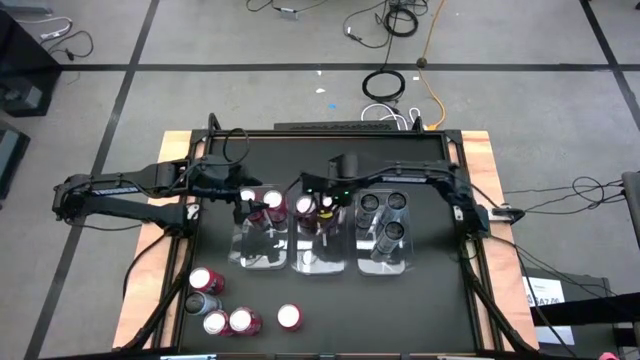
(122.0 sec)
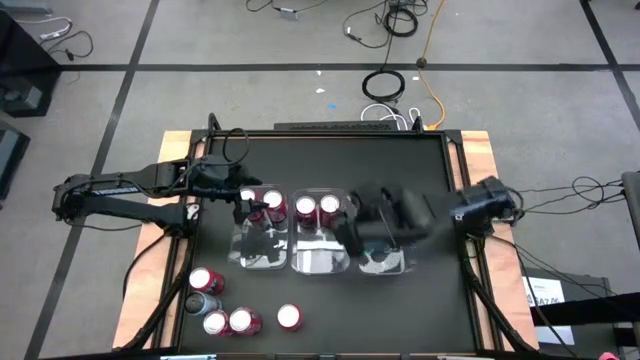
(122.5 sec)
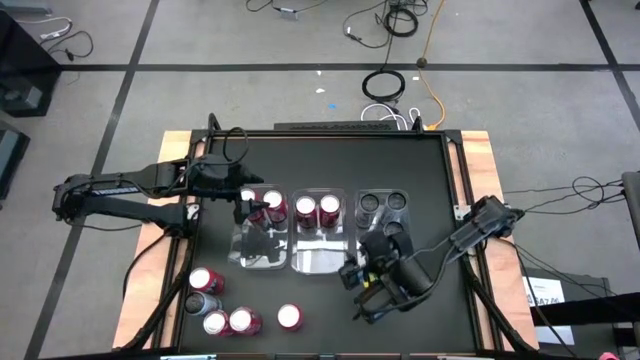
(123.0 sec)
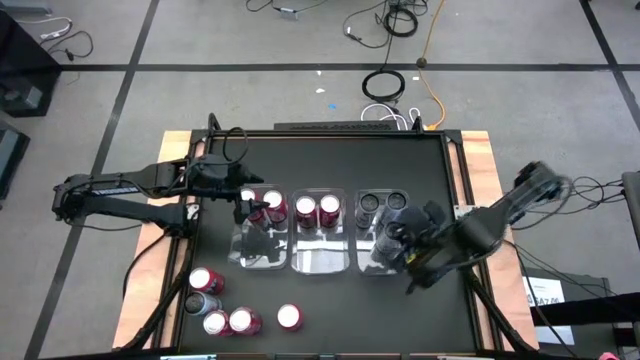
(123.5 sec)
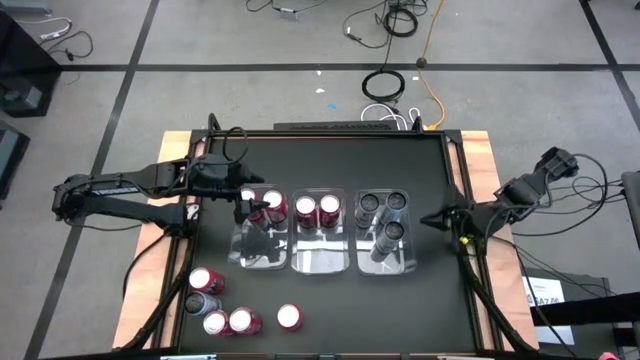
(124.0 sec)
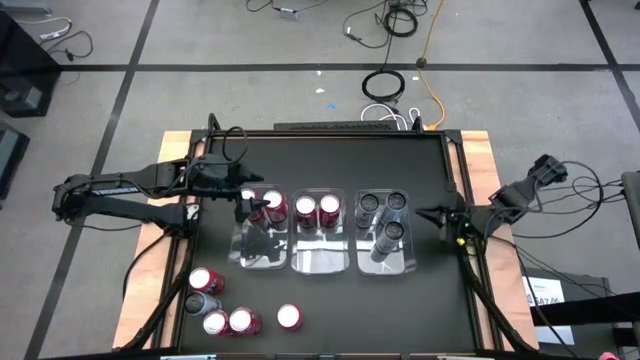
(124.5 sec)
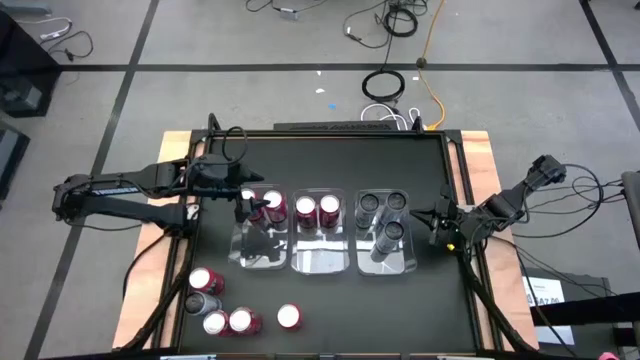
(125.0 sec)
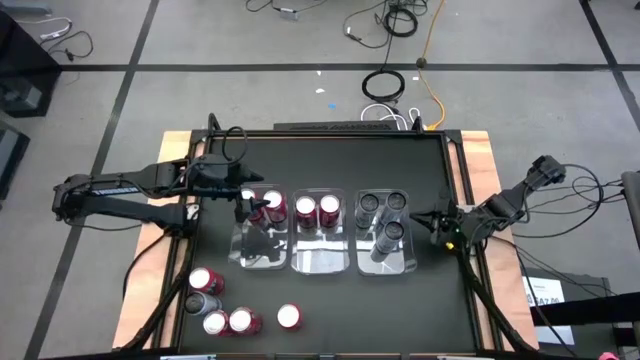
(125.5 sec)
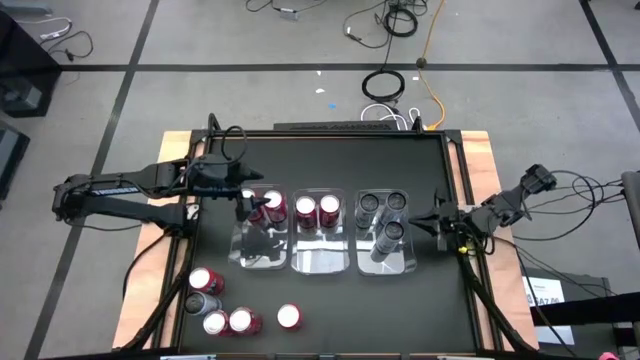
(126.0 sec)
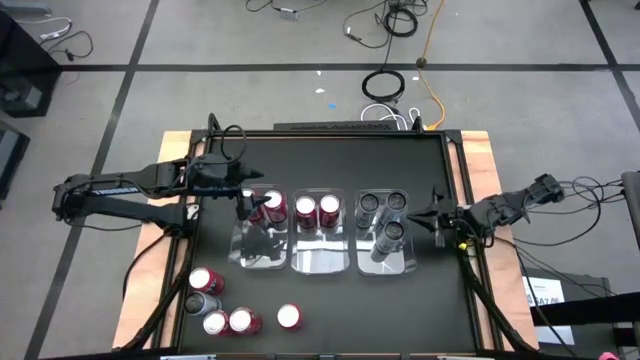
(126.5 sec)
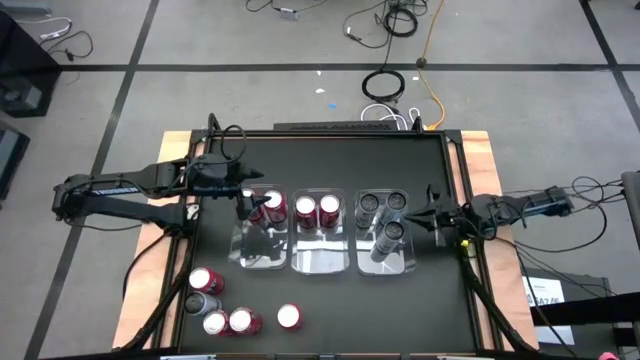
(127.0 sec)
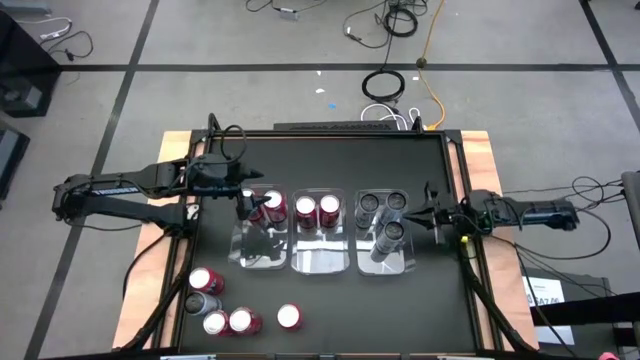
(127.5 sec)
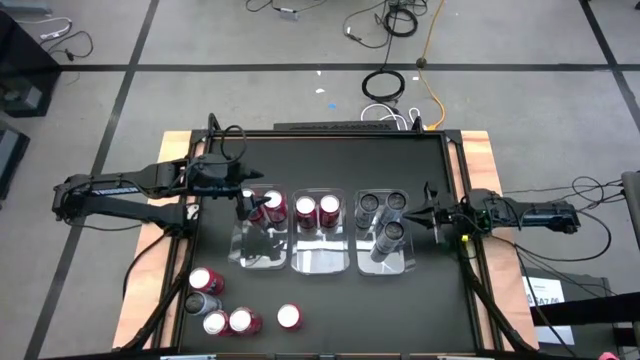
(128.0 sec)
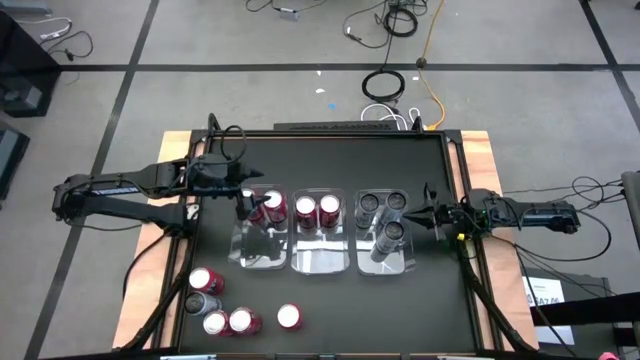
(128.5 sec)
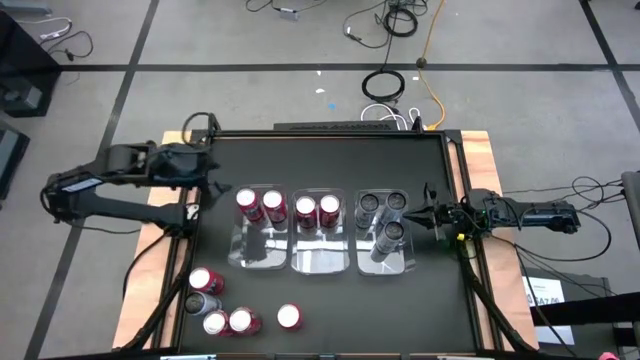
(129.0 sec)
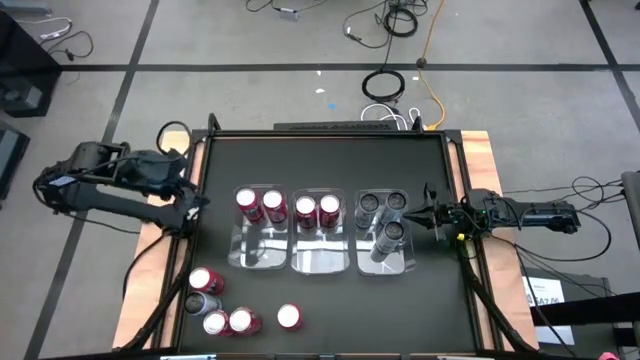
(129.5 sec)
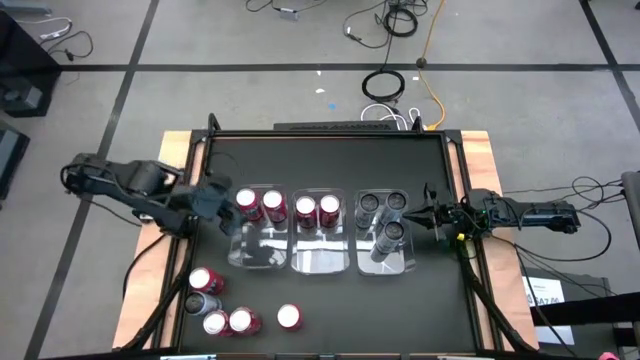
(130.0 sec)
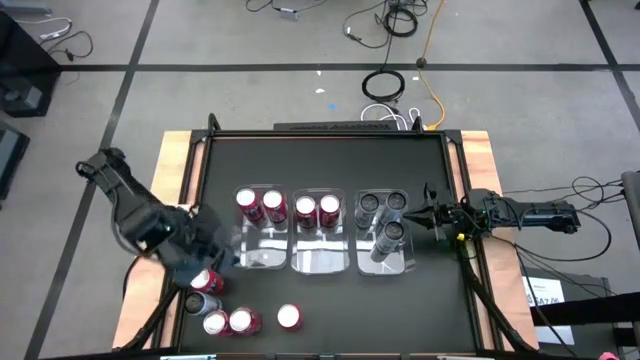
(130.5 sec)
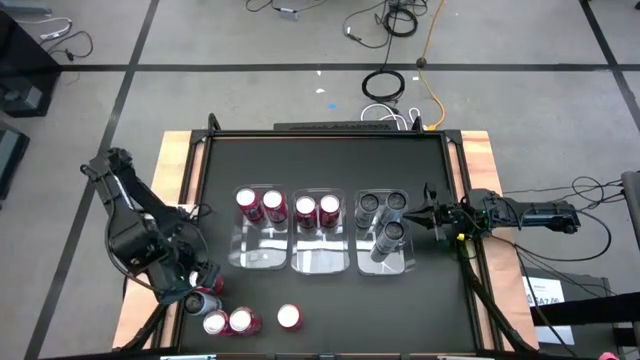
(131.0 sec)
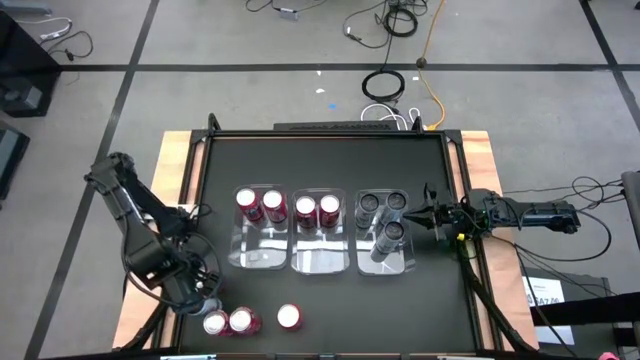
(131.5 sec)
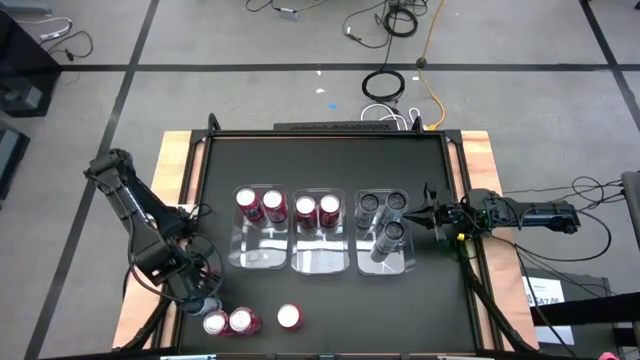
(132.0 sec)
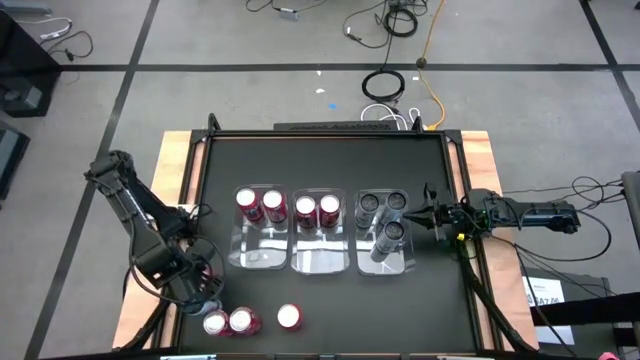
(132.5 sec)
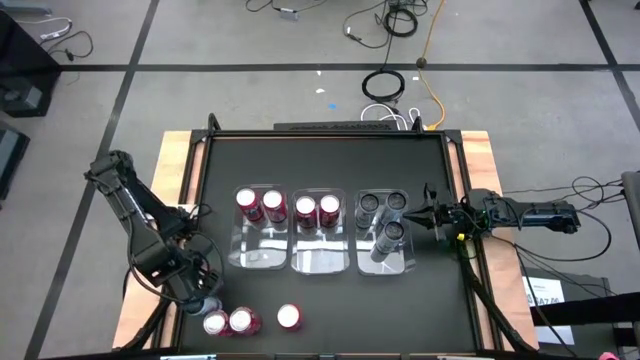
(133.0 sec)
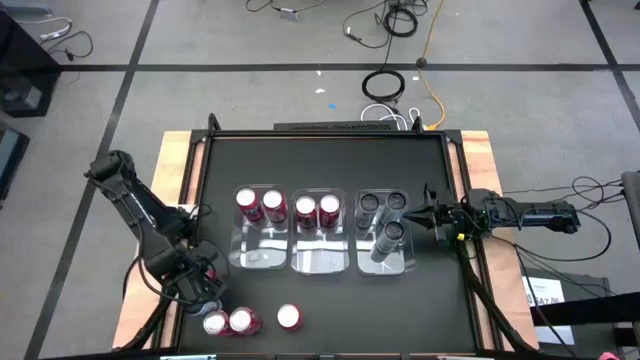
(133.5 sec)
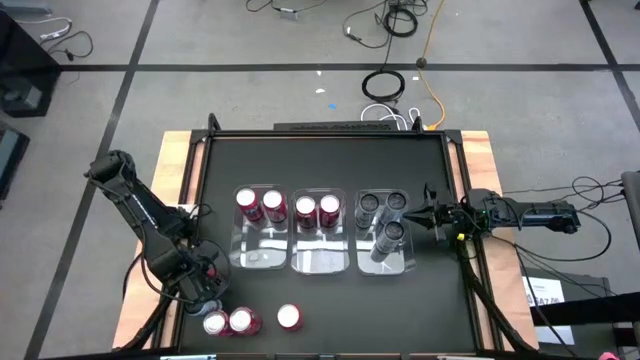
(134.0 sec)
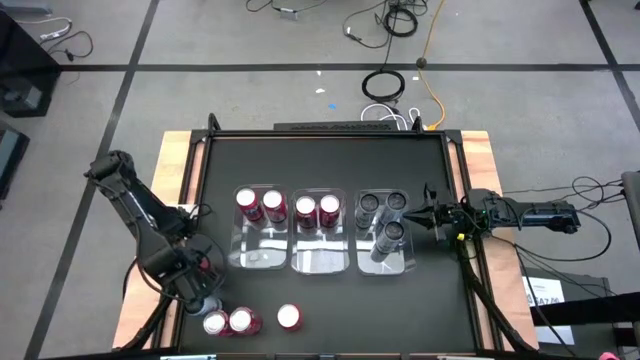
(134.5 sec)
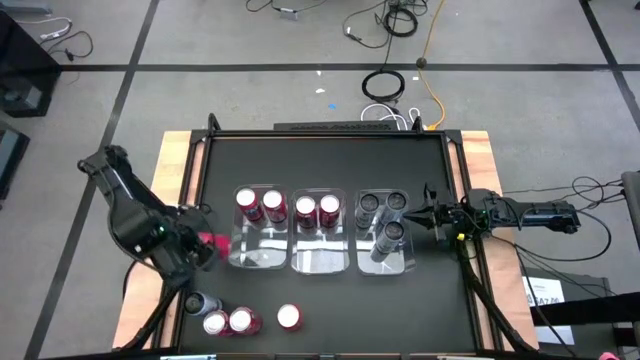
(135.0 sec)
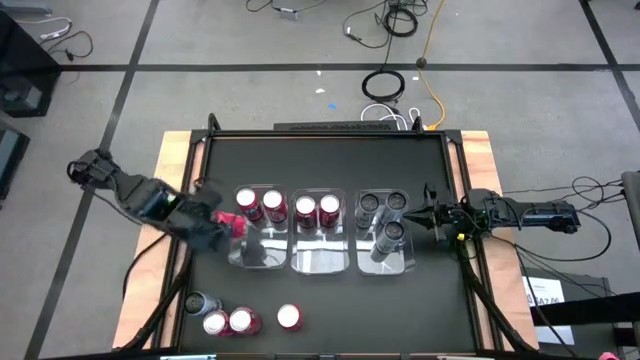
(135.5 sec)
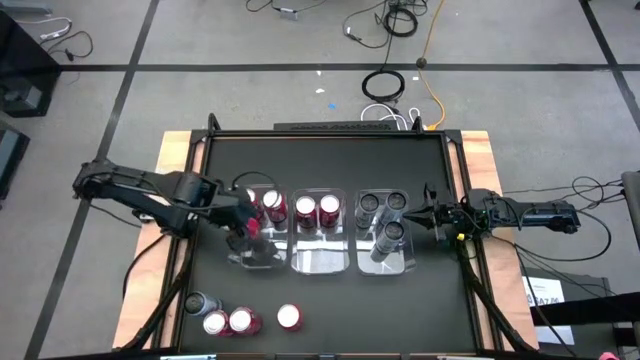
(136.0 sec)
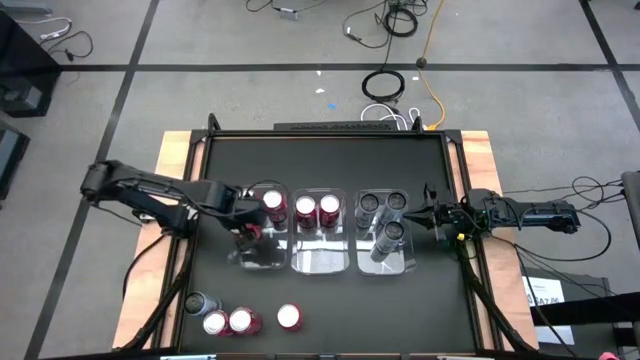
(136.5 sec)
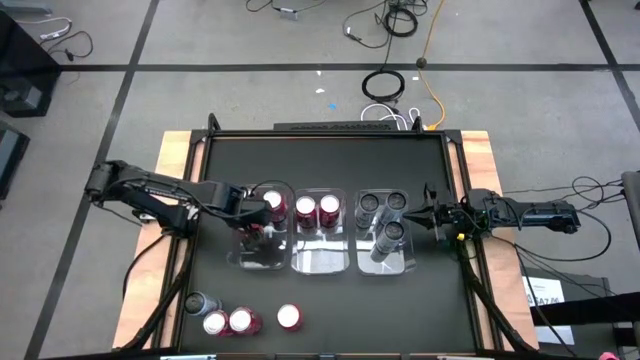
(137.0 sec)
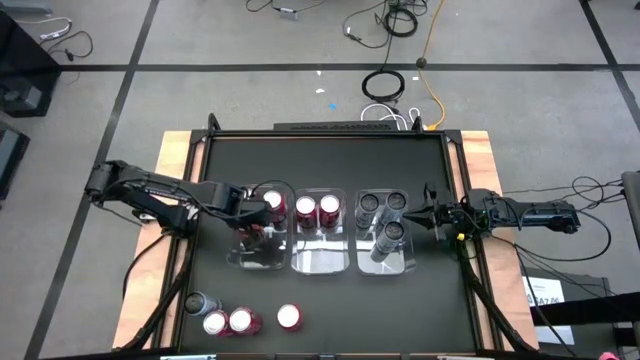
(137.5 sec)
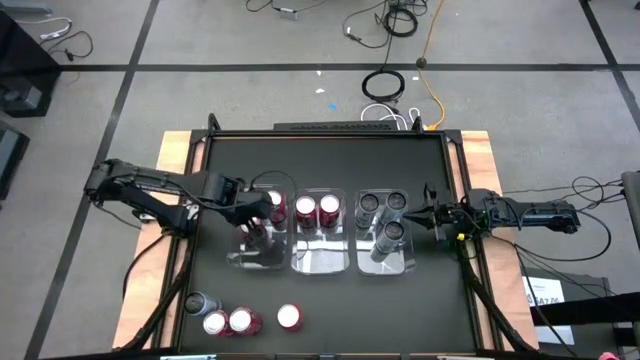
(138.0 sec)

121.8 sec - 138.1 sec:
Task: Sort soda cans
Put the left red soda can into the left transparent bin

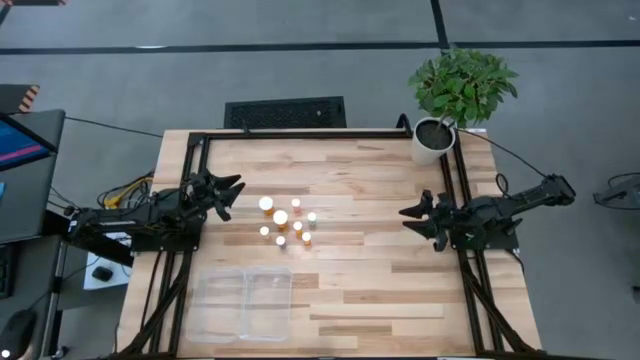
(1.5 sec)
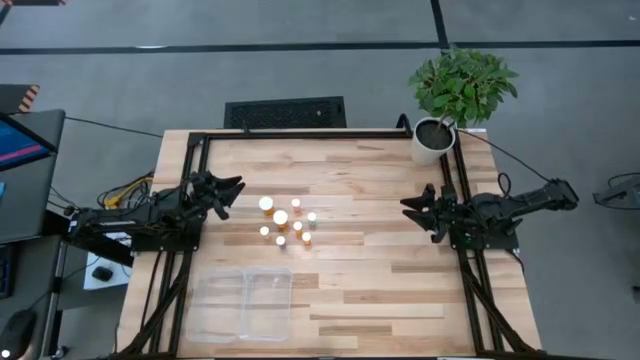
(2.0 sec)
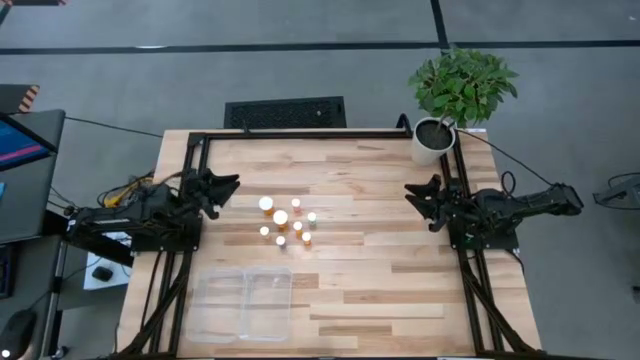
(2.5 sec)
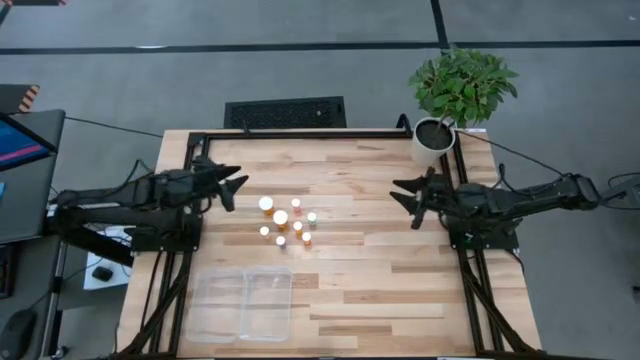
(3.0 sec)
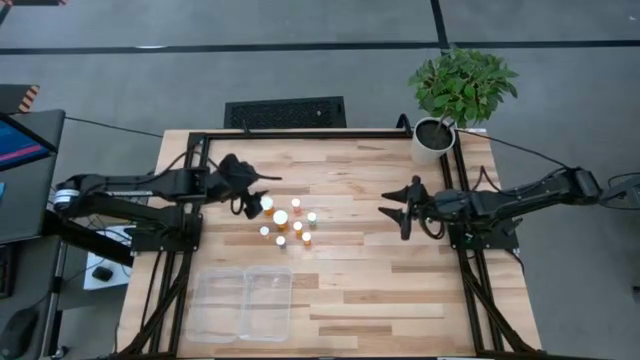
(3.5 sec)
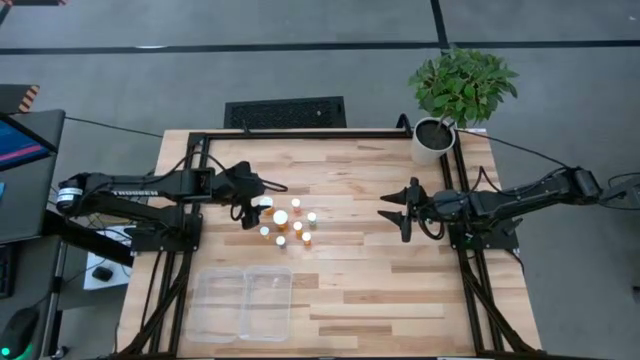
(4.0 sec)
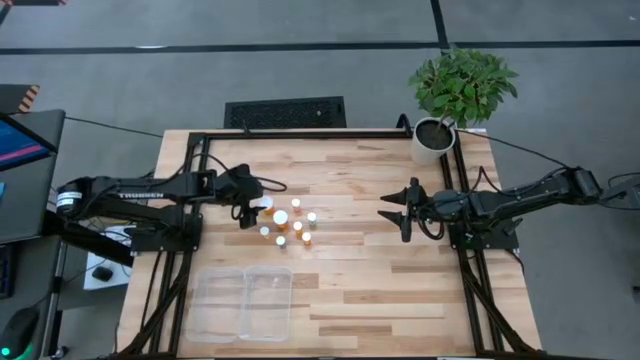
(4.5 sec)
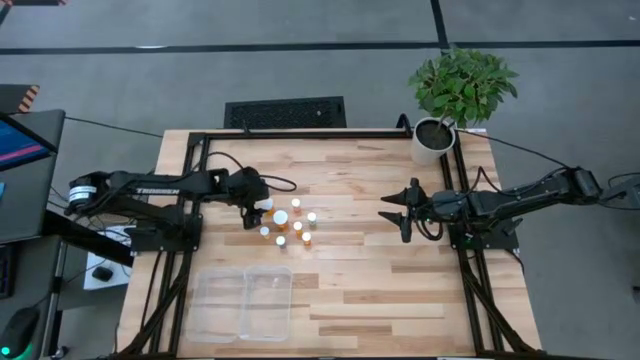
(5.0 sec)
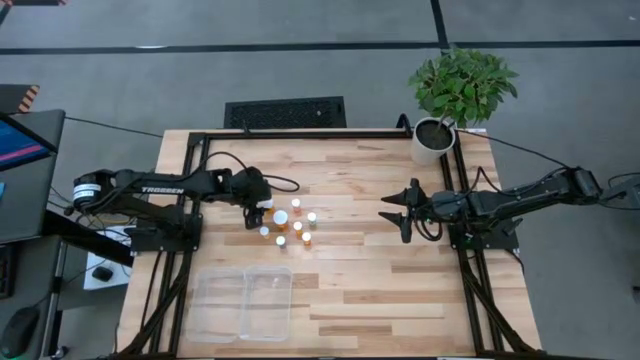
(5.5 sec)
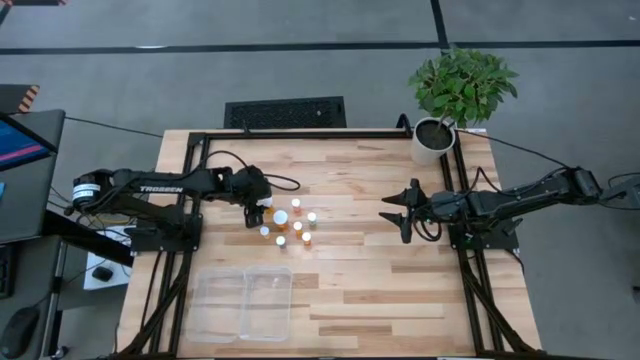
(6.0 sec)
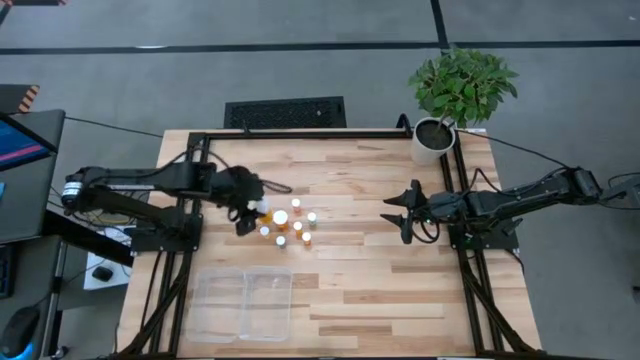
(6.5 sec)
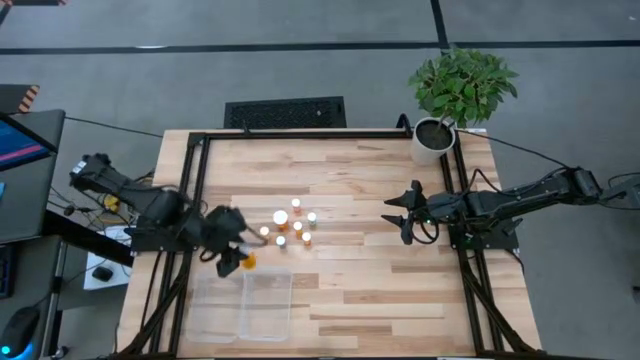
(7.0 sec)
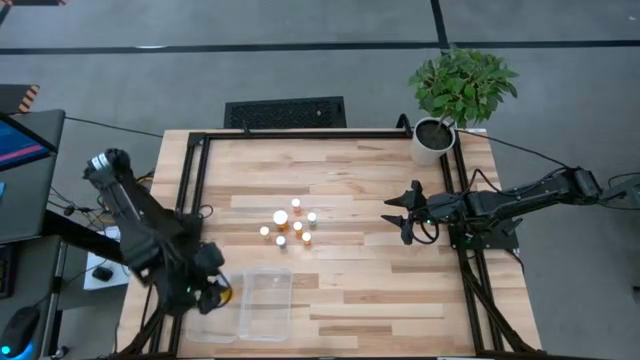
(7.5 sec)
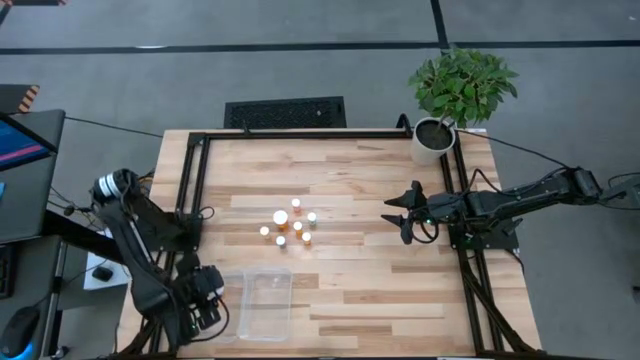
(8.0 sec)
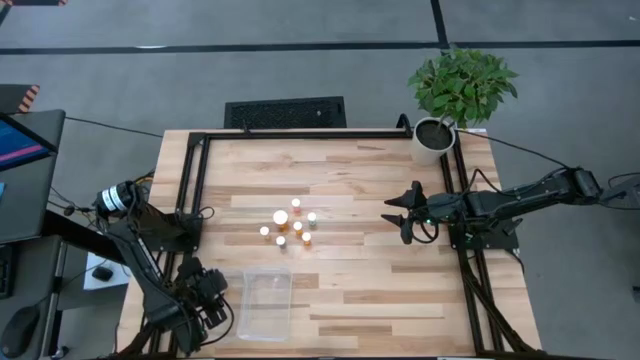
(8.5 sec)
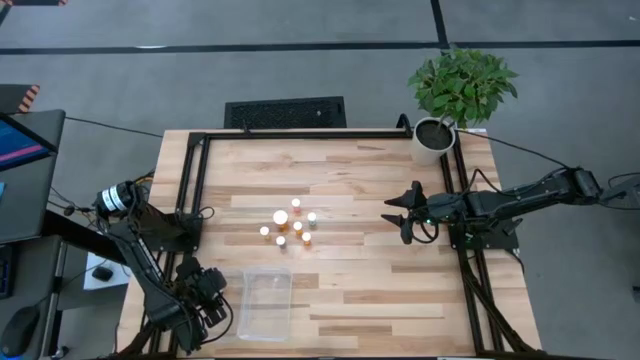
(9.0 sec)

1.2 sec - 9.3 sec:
Task: Pick and place medicine bottles into bin by pill shape (circle, oval)
Put the large orange pill bottle into the left transparent bin
